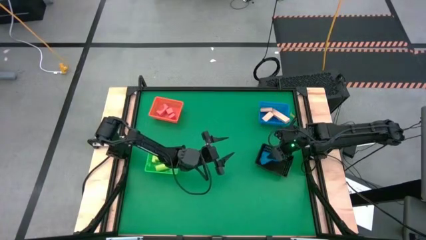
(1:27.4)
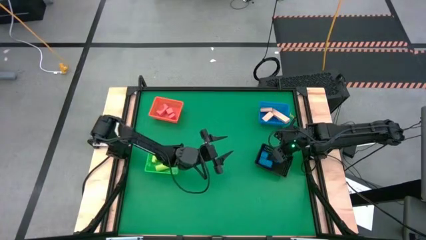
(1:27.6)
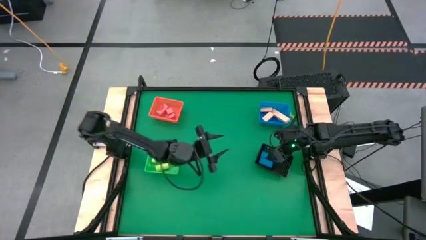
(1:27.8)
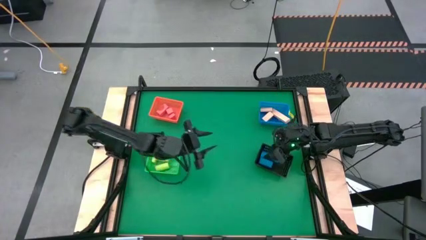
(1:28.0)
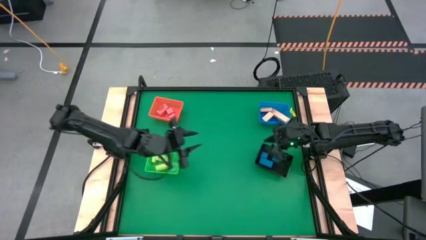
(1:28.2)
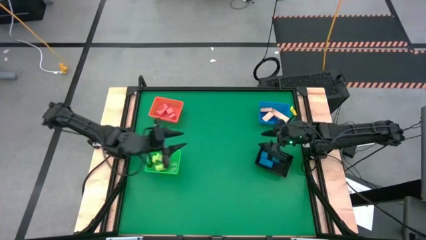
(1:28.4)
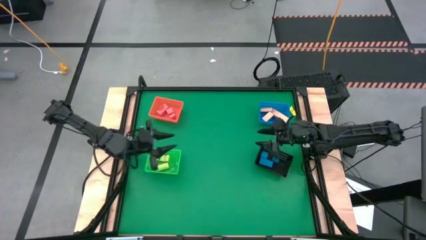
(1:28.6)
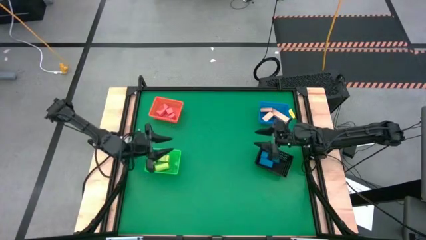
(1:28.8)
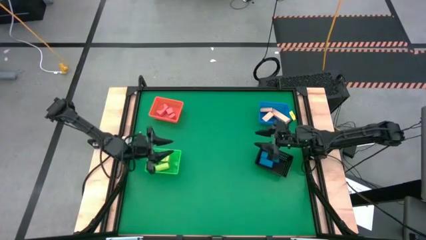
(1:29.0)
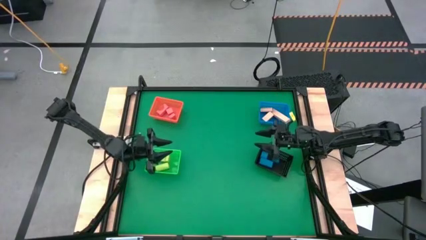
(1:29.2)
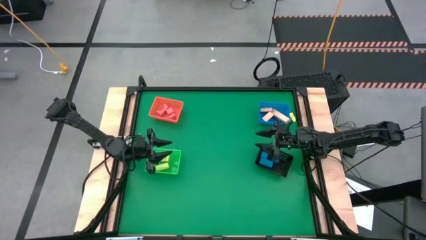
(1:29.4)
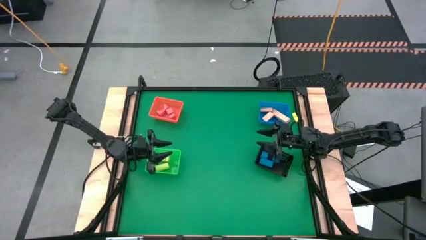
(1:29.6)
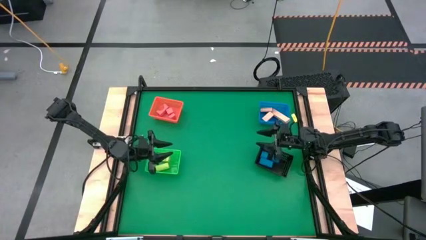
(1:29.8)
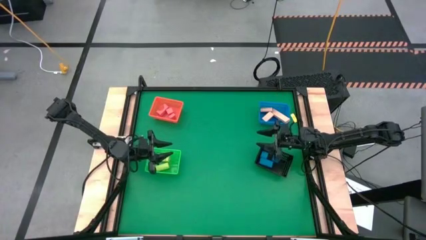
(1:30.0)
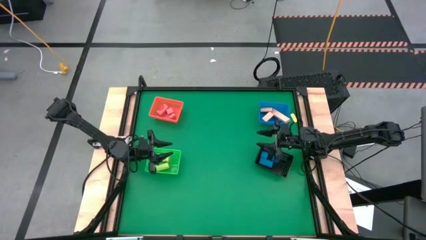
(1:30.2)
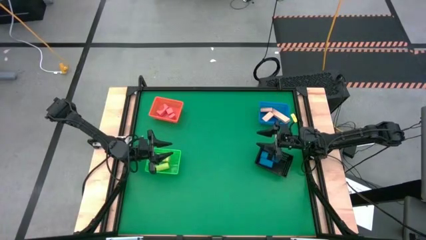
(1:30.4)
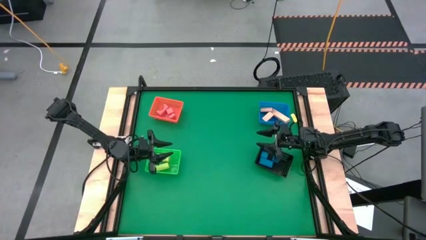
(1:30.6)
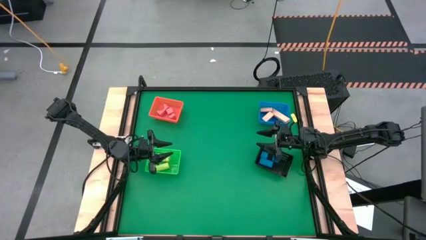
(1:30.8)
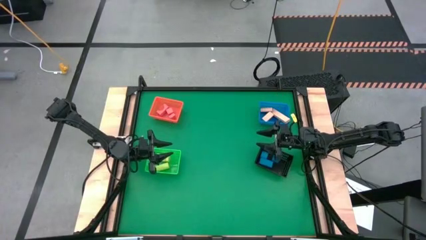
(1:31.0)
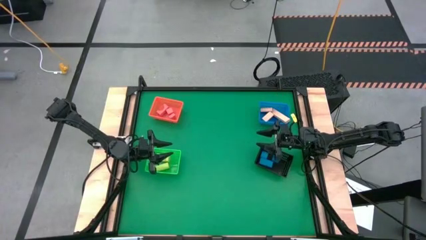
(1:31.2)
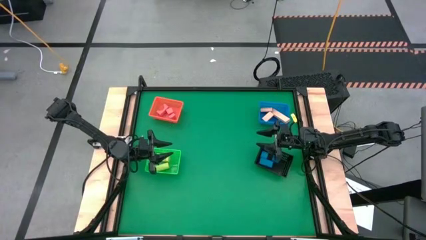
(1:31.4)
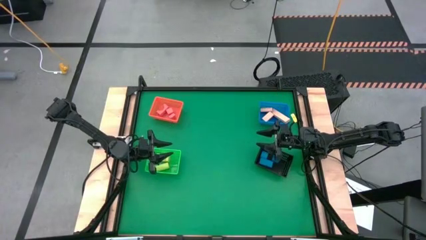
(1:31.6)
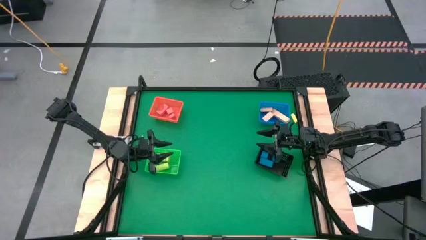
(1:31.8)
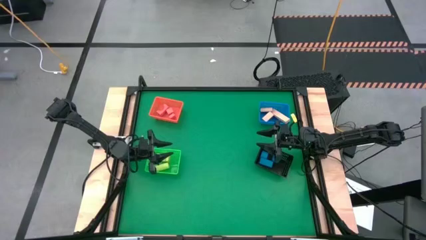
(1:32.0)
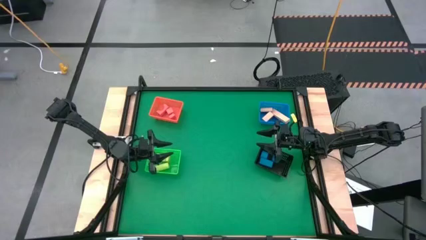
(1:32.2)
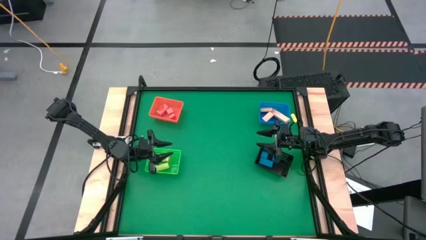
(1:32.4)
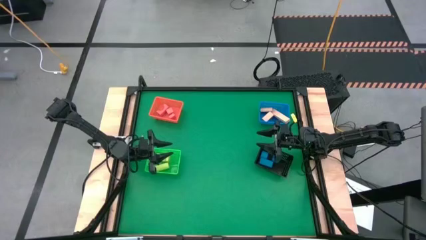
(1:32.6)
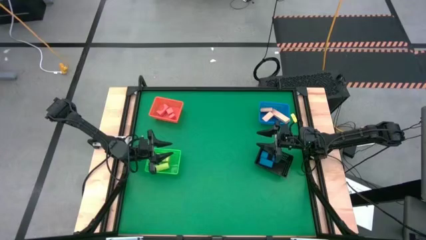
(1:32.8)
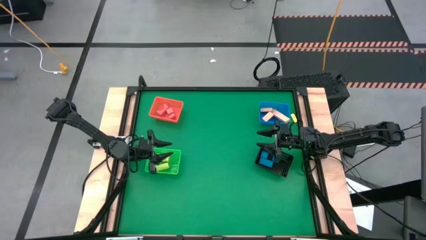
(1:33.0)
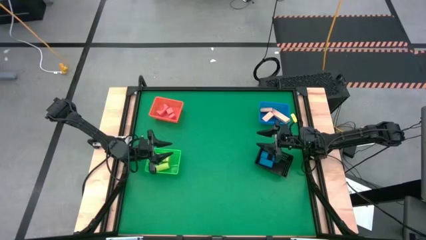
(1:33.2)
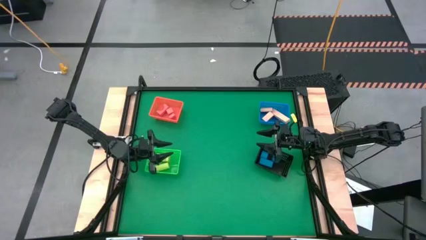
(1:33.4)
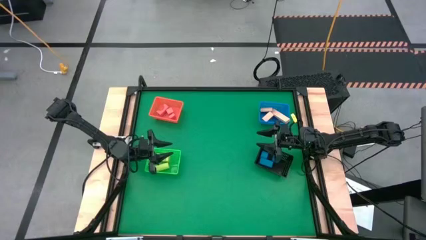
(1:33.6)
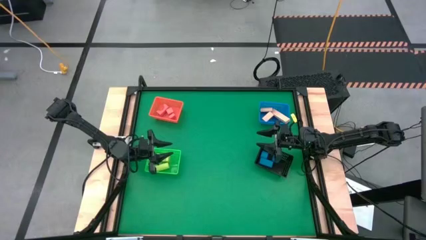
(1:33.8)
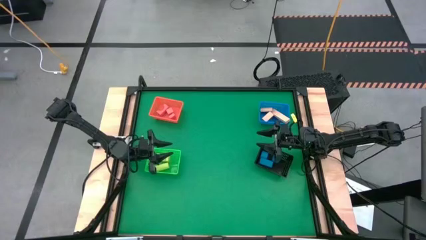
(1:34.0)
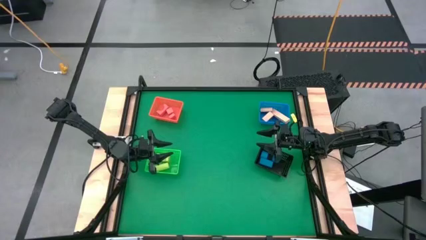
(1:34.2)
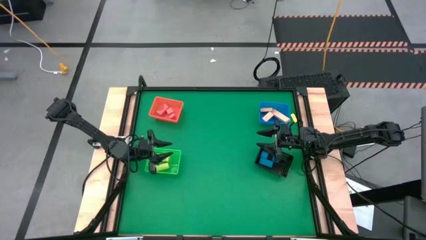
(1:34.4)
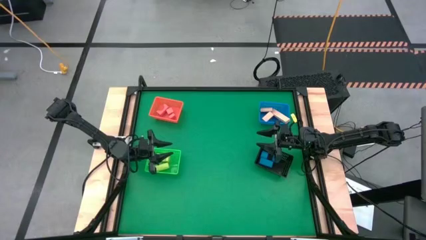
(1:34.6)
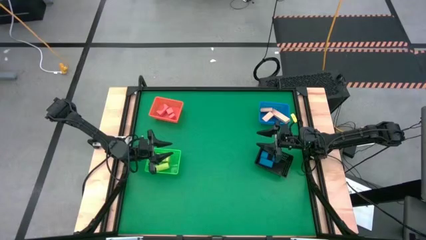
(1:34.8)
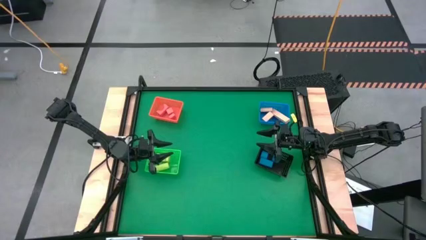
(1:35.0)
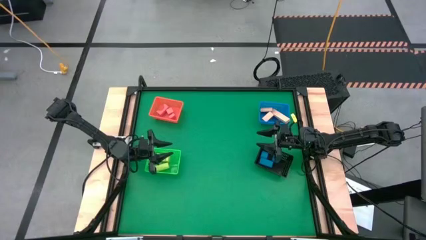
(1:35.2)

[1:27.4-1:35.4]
Task: Sort & place blocks by color
Return to Home Position

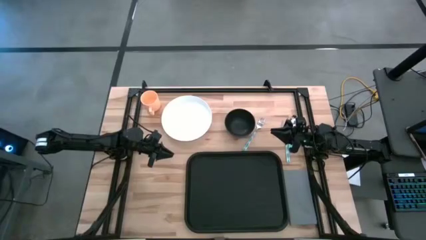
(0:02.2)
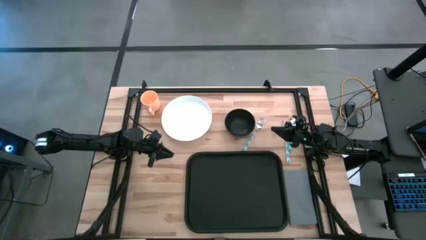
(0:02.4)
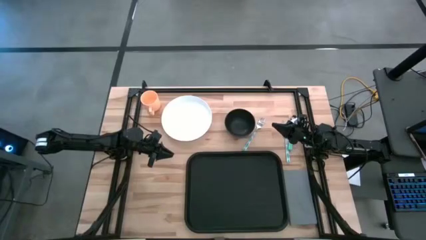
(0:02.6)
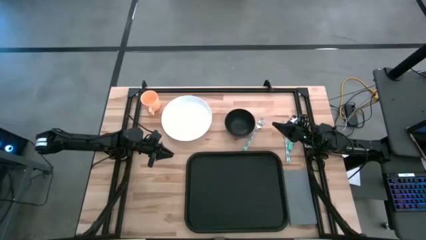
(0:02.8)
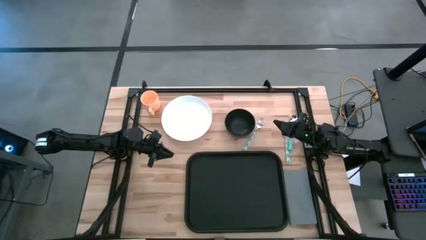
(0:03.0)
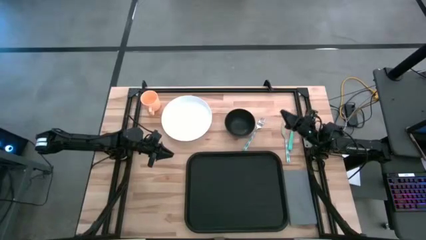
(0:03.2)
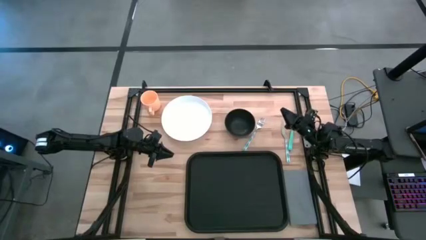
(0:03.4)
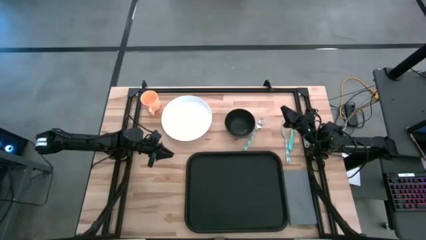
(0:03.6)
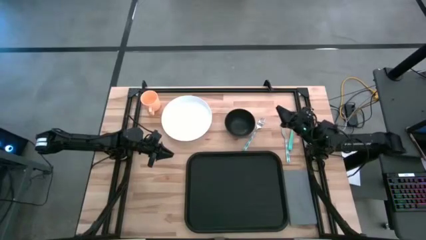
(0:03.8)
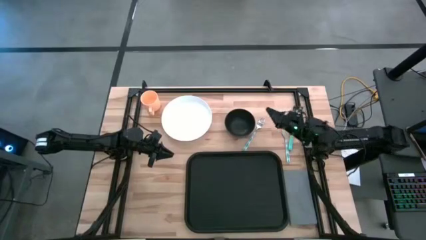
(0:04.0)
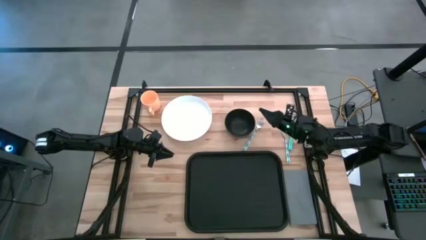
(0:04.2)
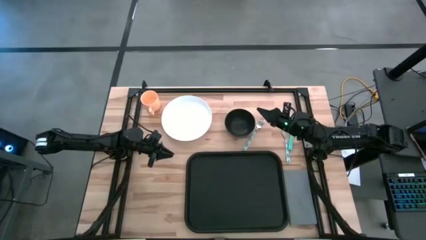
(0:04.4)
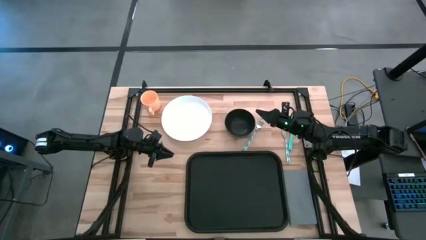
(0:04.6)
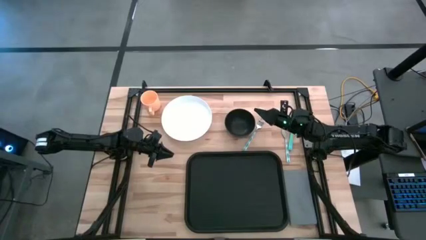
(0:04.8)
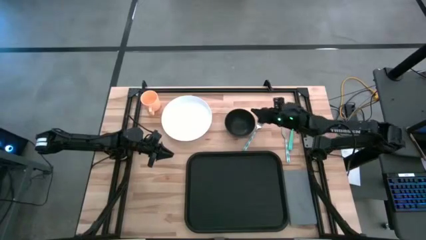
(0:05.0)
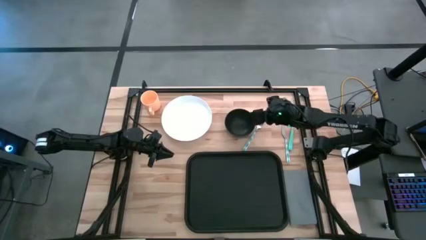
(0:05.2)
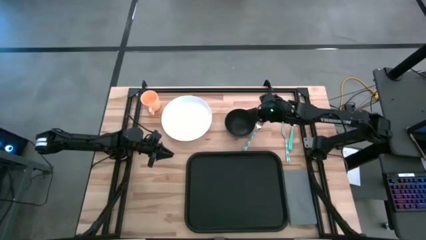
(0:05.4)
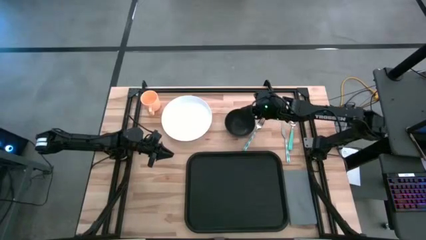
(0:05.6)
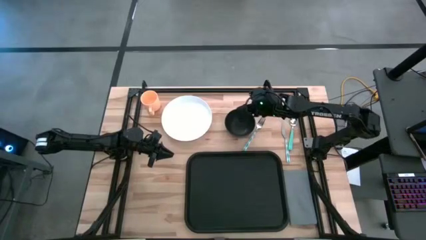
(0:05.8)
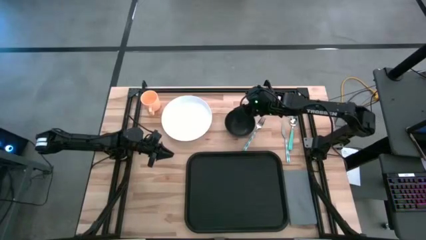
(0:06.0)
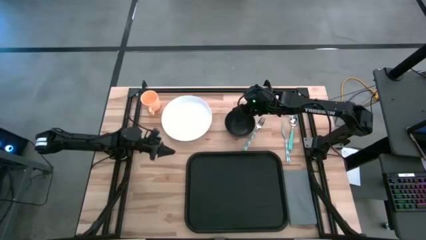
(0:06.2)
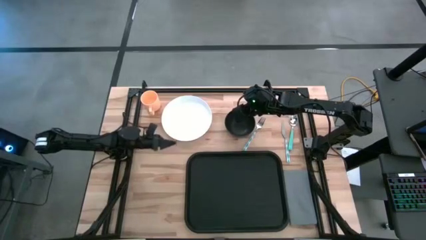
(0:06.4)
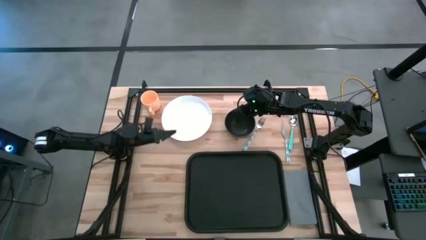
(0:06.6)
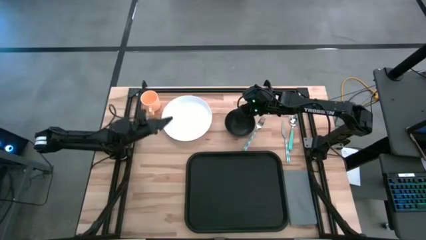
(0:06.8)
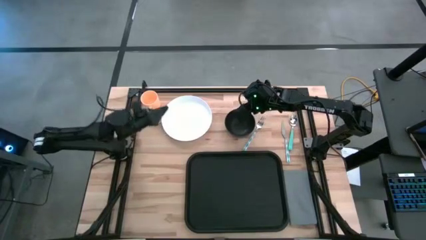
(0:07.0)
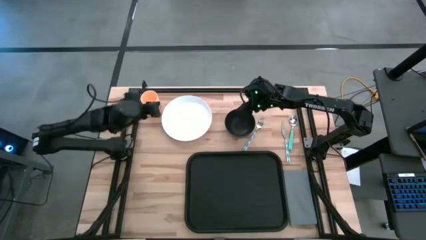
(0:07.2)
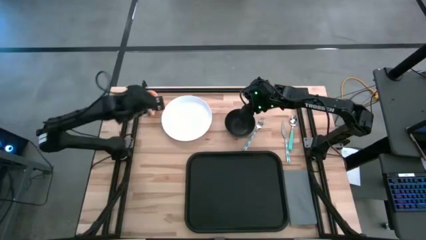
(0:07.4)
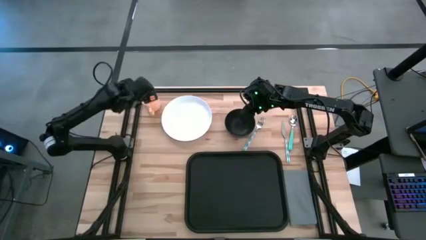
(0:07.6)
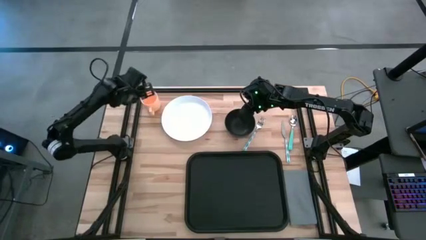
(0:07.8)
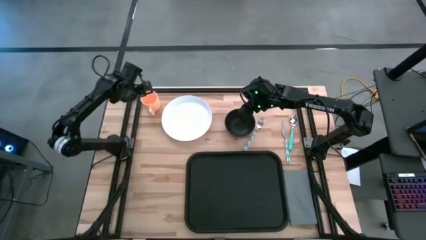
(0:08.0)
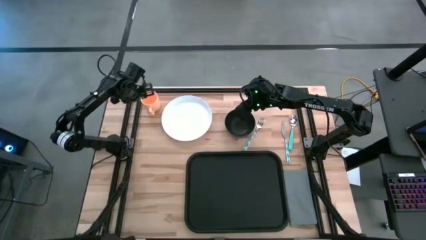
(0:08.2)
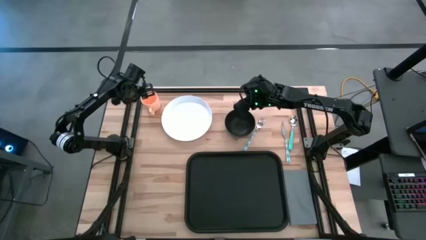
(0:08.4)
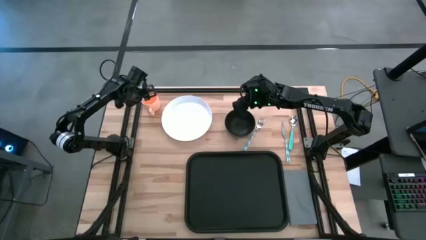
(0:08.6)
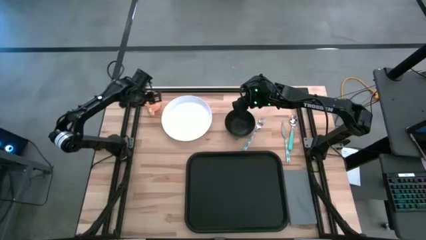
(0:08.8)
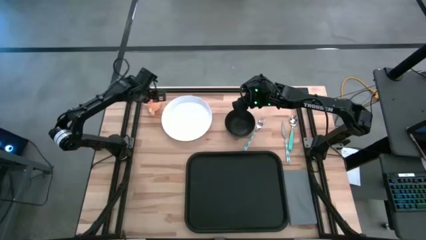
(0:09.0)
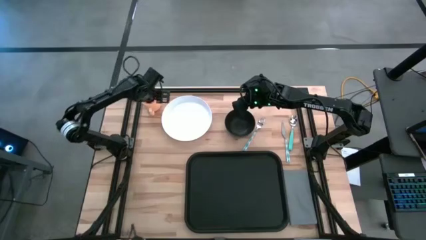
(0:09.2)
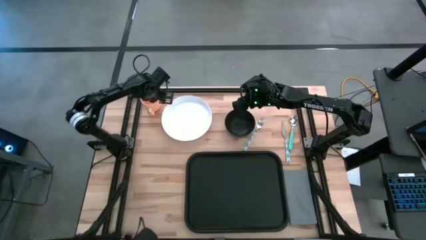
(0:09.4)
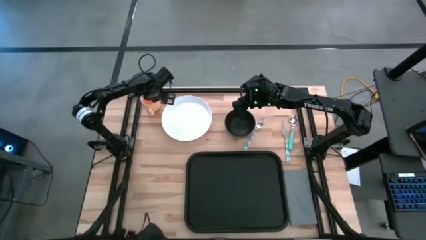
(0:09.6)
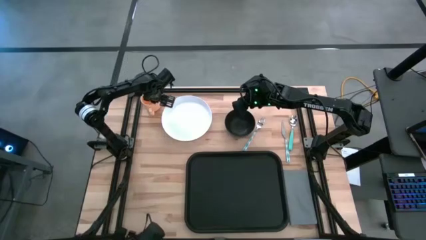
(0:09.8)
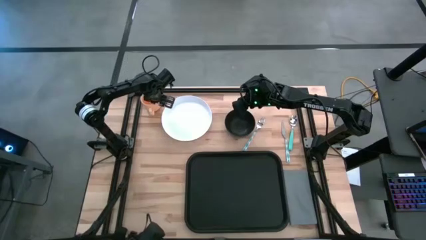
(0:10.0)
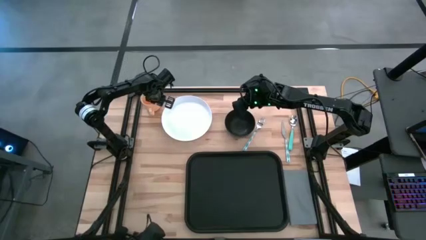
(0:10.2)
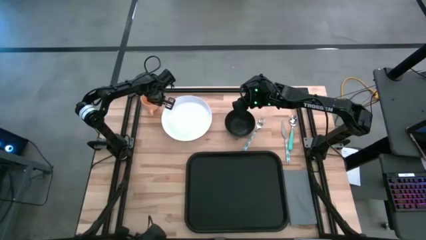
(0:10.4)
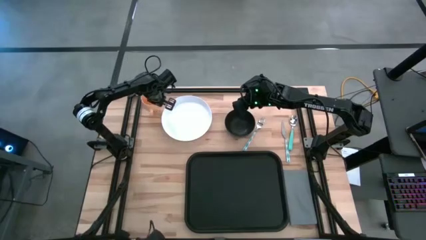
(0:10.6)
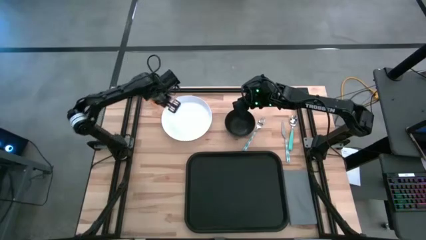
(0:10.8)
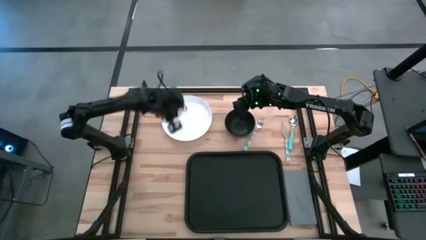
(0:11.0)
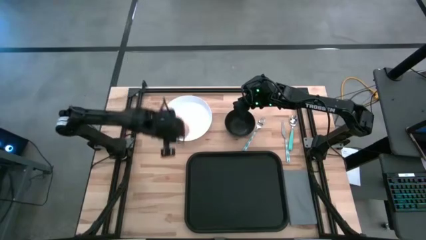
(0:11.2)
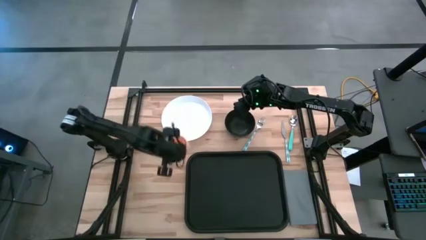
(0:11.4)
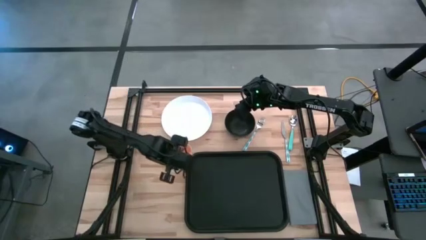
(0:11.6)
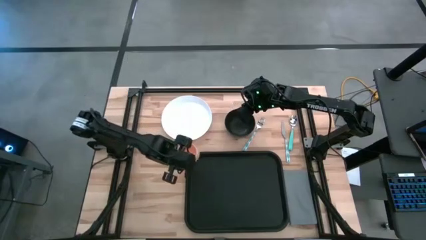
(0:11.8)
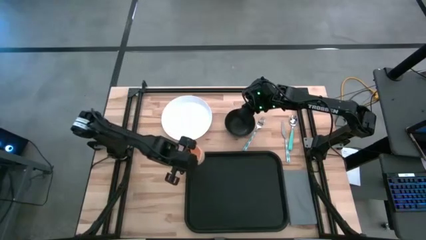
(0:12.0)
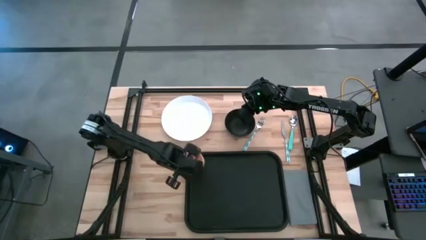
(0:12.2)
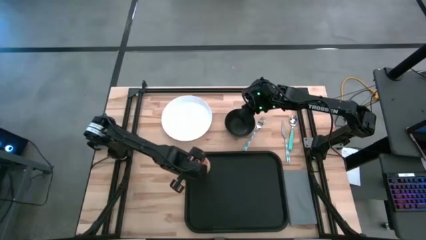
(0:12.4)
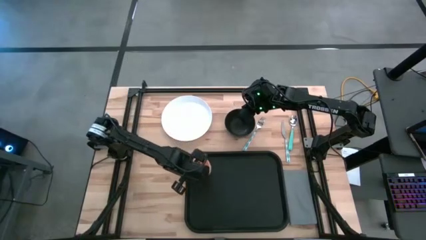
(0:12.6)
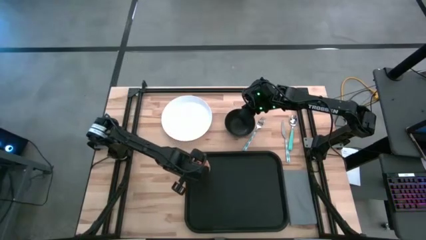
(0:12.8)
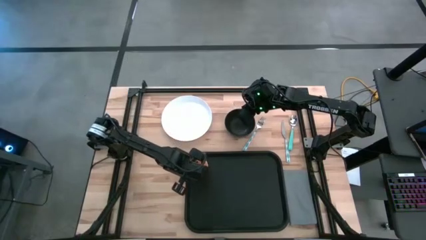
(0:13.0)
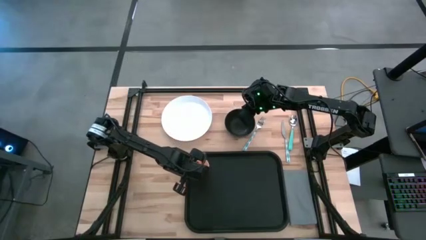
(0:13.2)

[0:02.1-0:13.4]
Task: Set up tray
Put the yellow cup to the top left of the black serving tray
